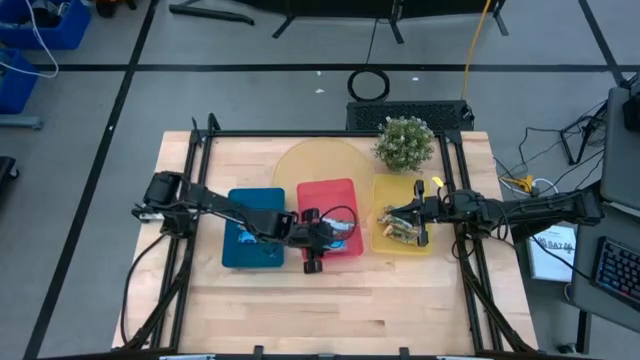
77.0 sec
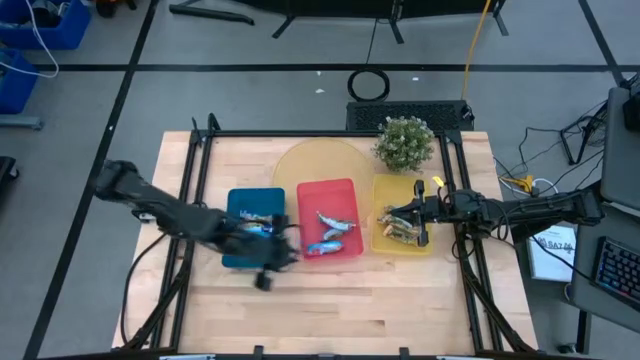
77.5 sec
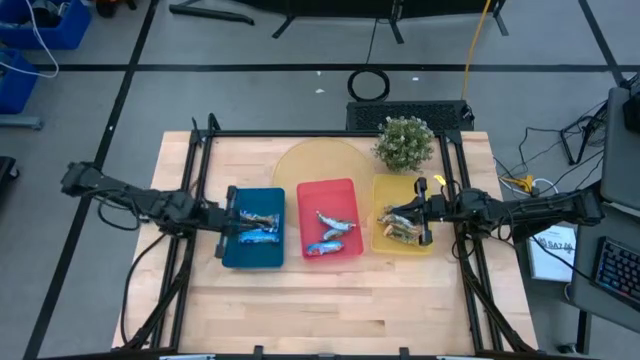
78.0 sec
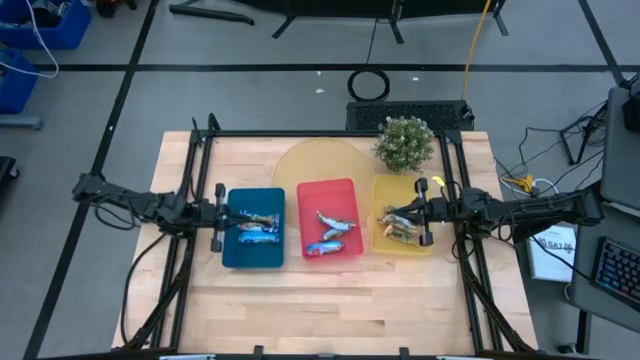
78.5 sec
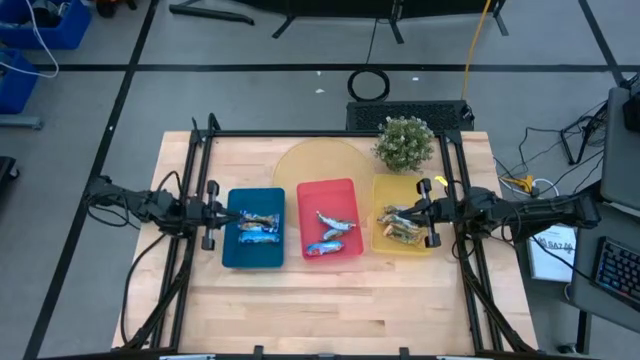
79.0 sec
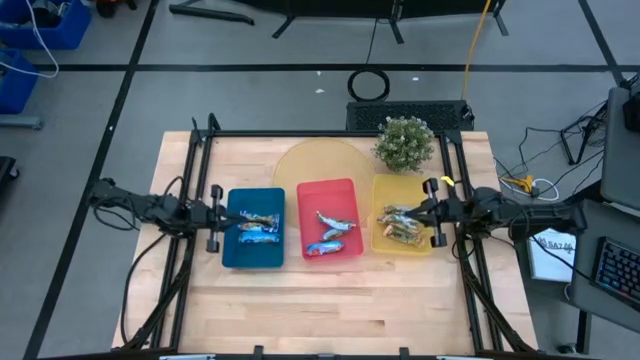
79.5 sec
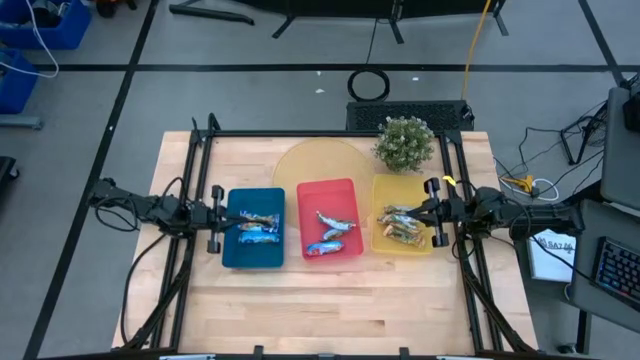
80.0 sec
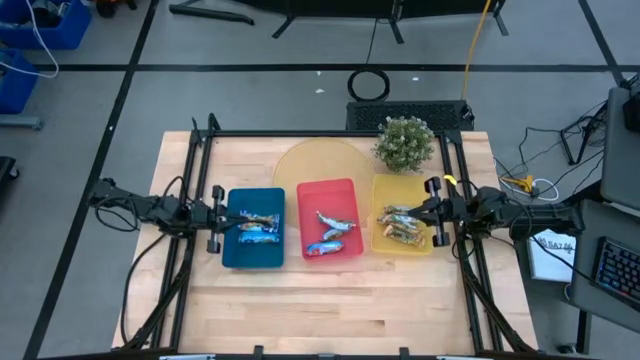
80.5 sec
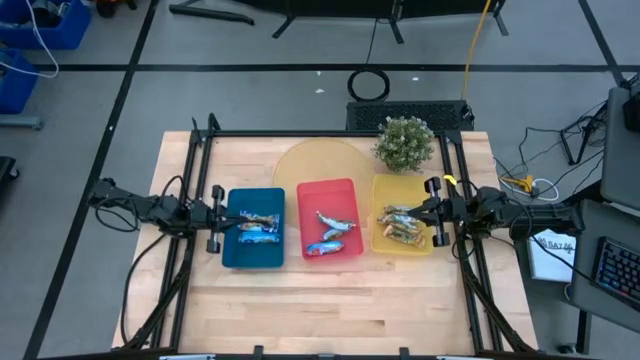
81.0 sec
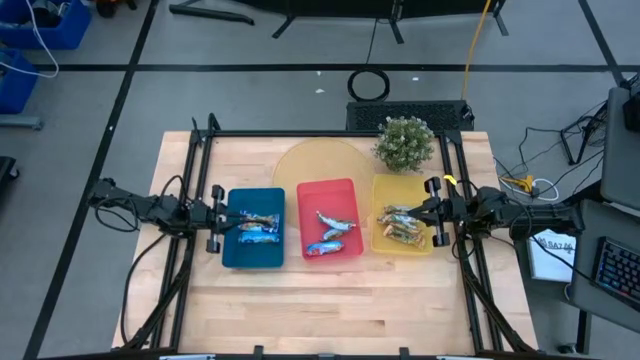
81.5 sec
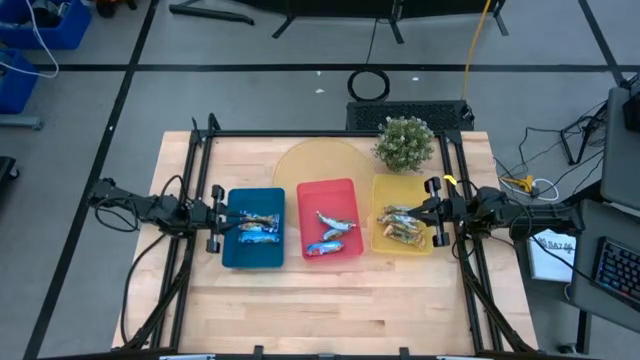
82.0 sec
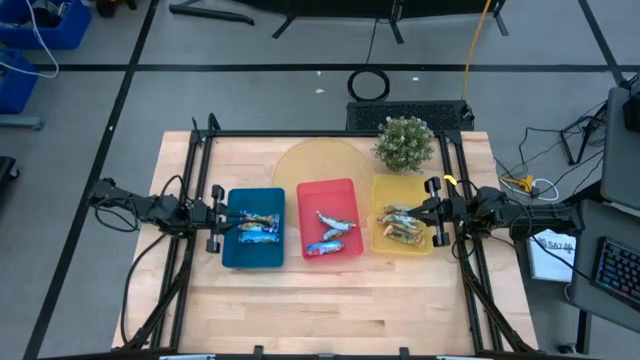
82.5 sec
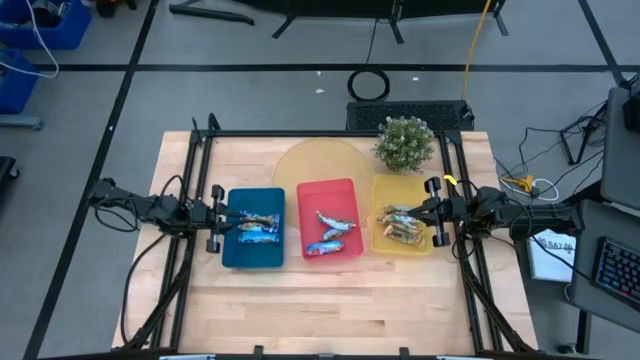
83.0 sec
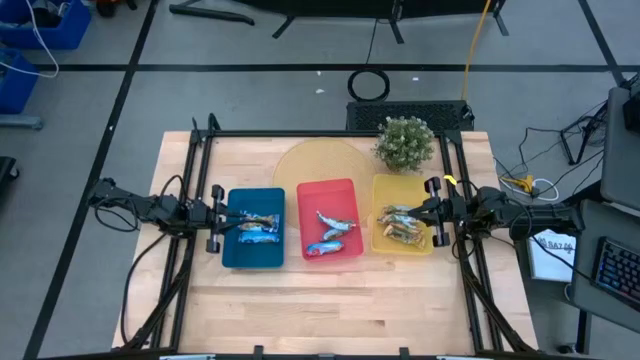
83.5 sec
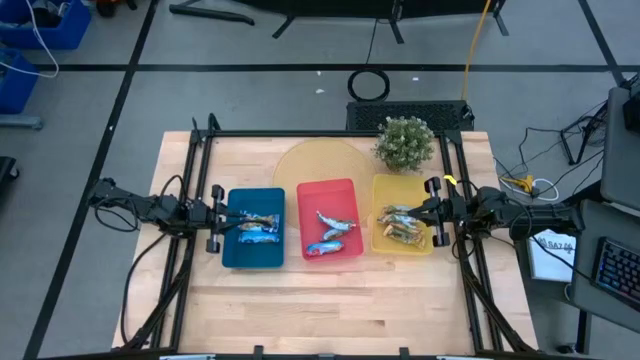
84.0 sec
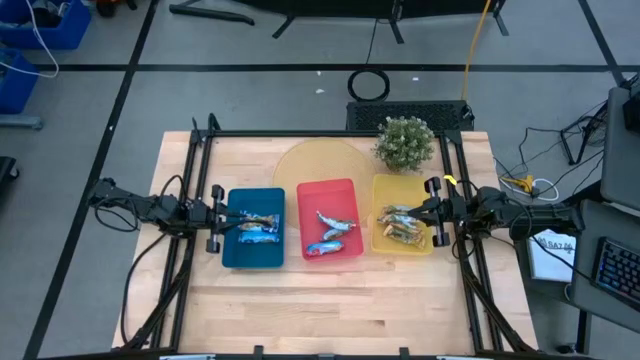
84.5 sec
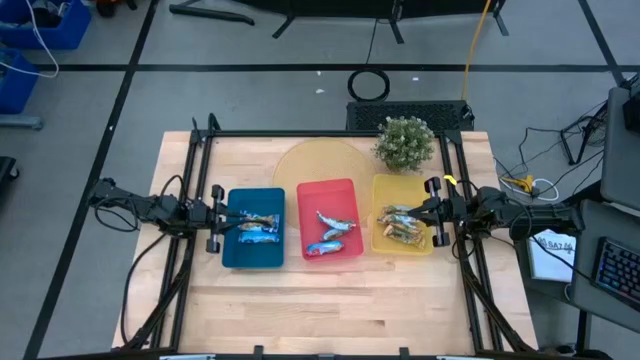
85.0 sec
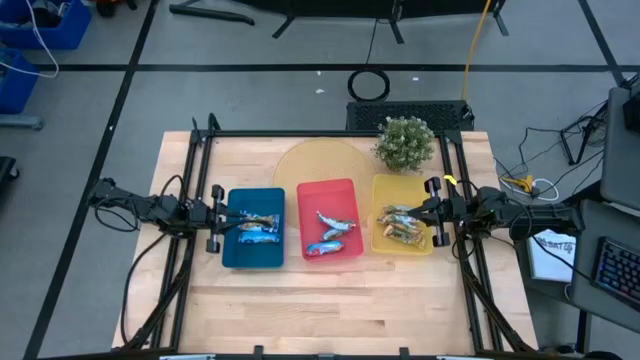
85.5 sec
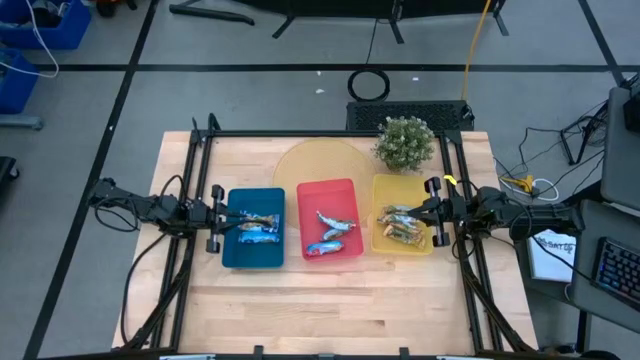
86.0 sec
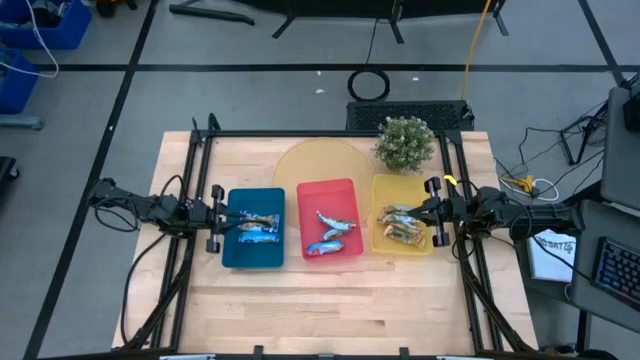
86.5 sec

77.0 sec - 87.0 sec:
Task: Pick and place Granola Bars by type
Return to Home Position

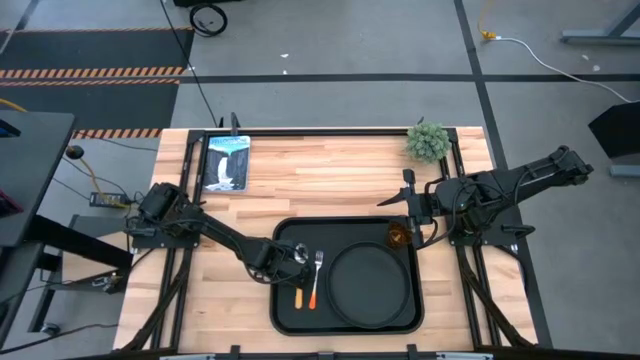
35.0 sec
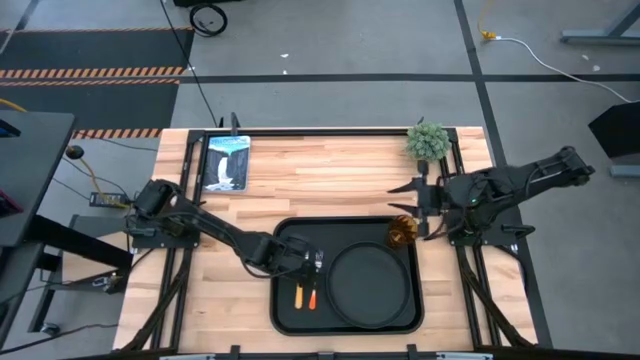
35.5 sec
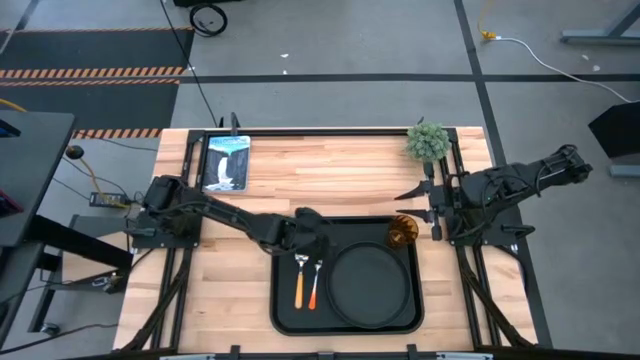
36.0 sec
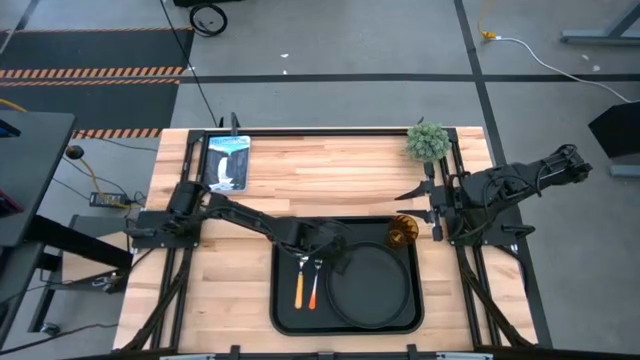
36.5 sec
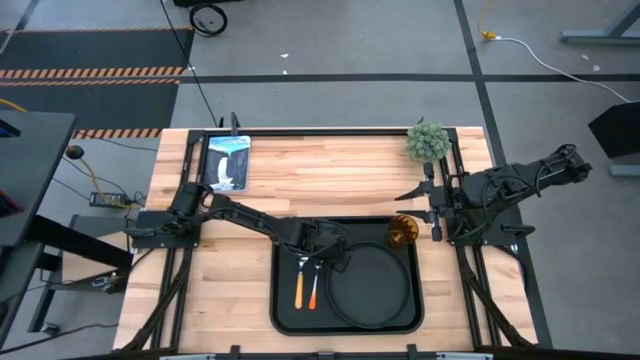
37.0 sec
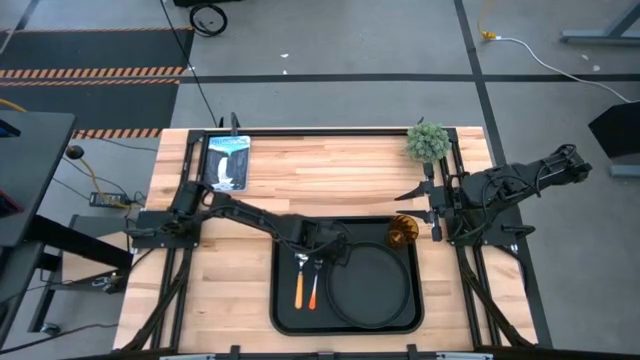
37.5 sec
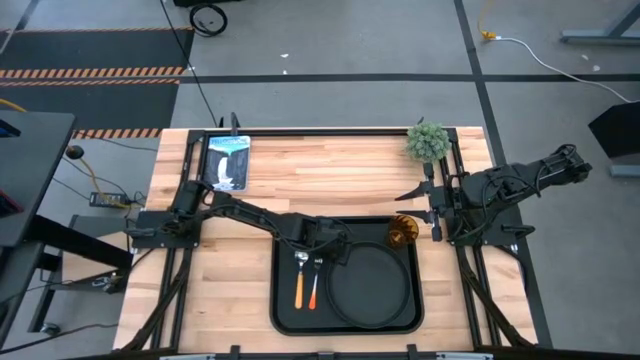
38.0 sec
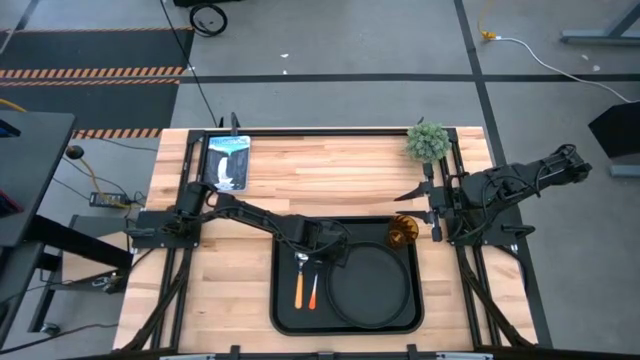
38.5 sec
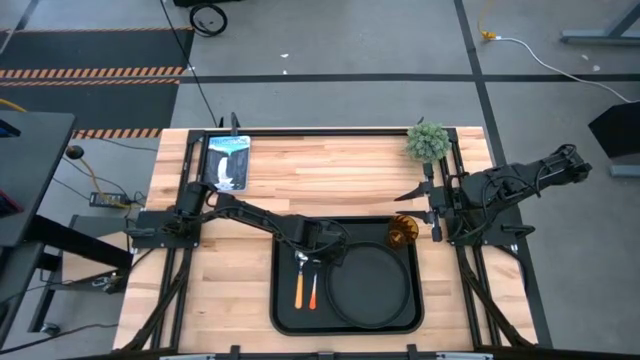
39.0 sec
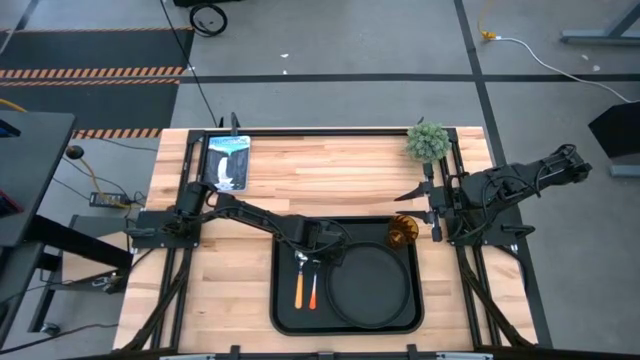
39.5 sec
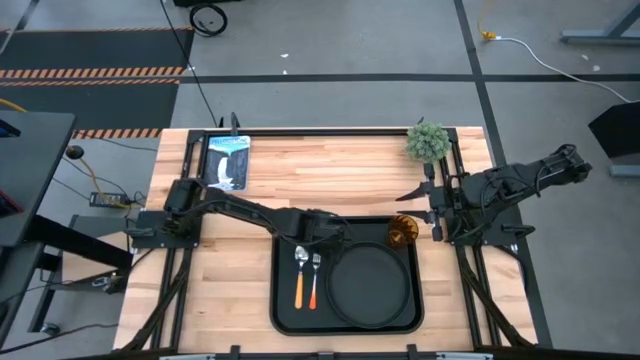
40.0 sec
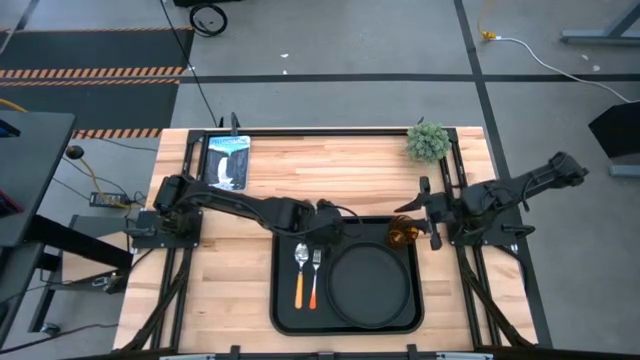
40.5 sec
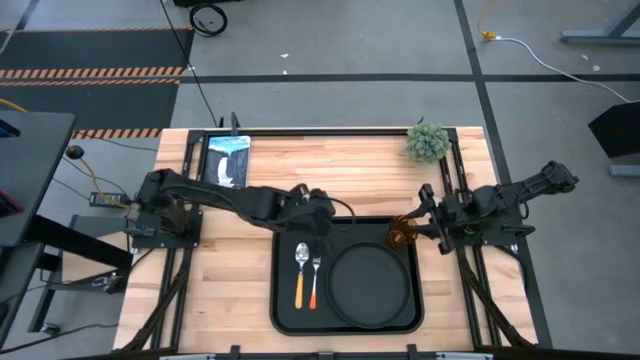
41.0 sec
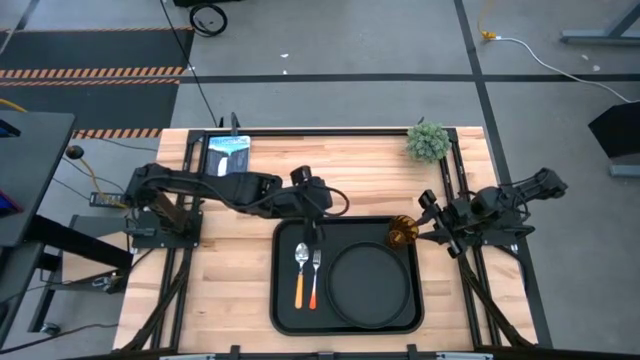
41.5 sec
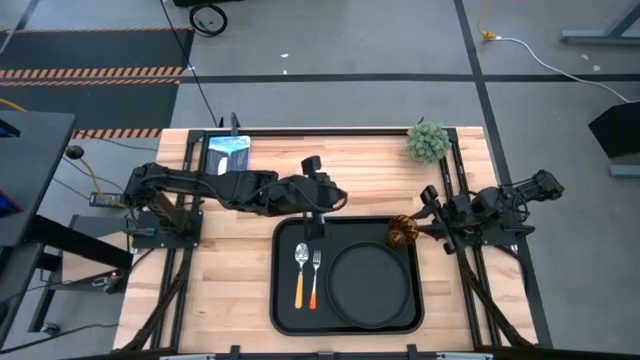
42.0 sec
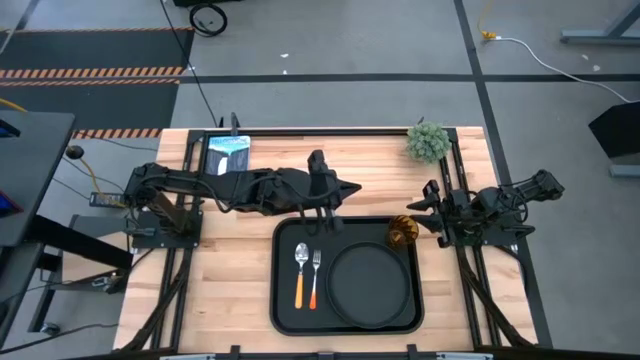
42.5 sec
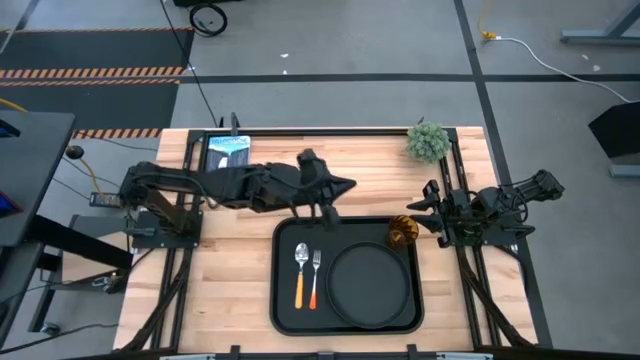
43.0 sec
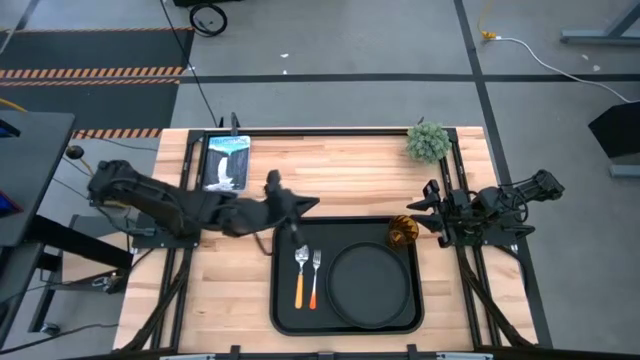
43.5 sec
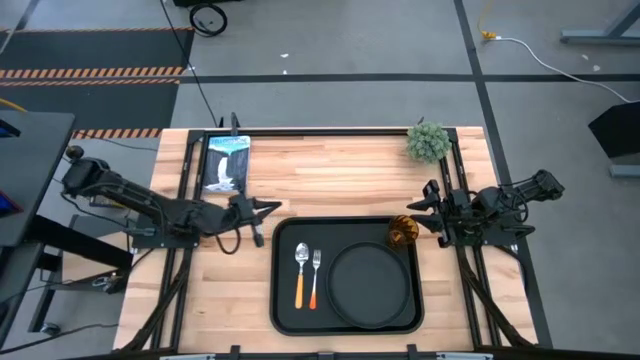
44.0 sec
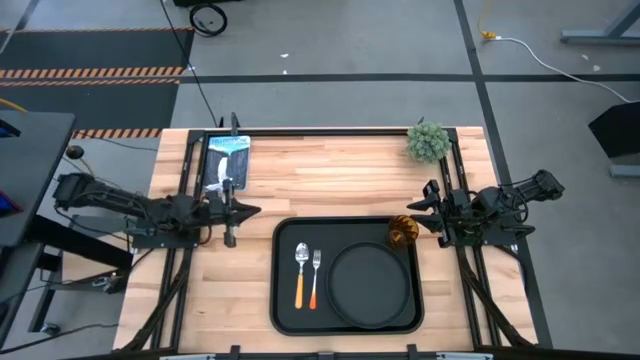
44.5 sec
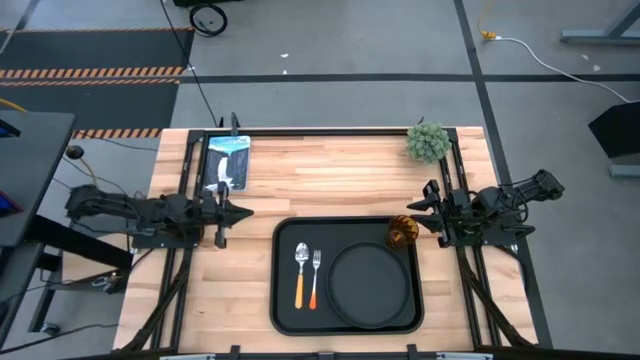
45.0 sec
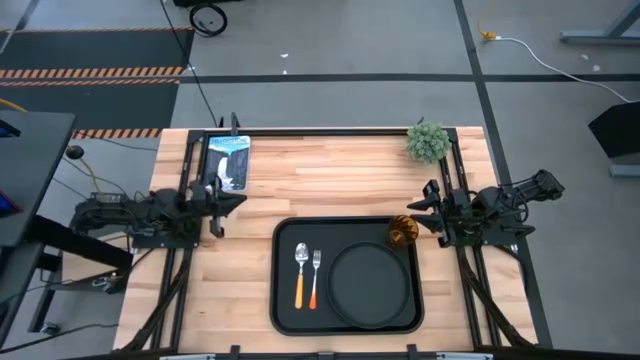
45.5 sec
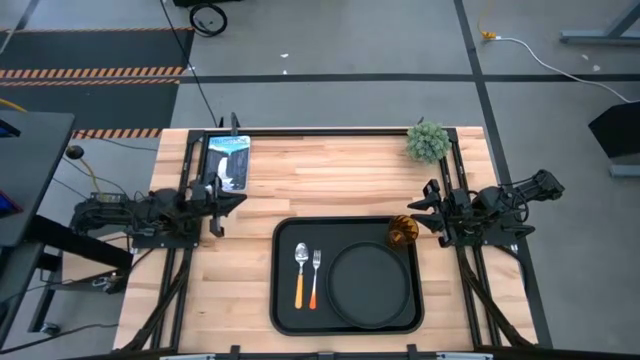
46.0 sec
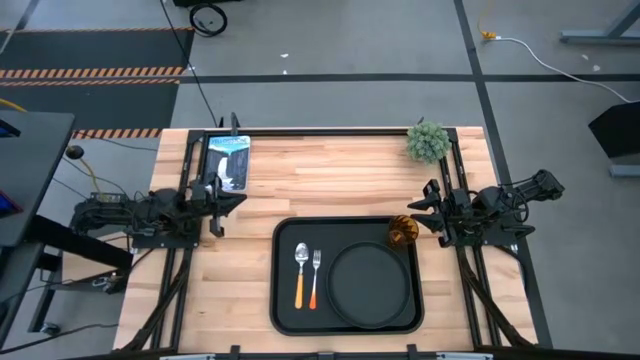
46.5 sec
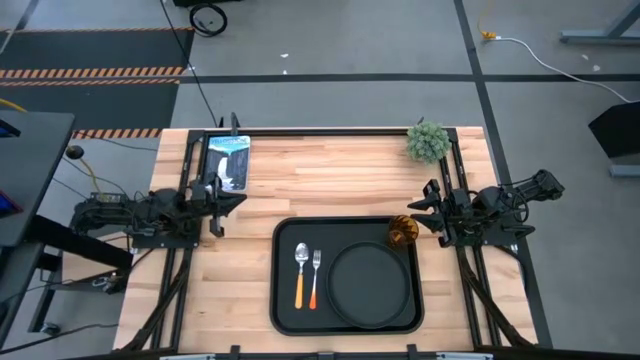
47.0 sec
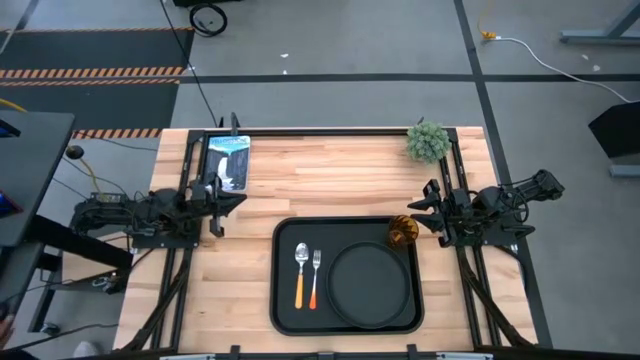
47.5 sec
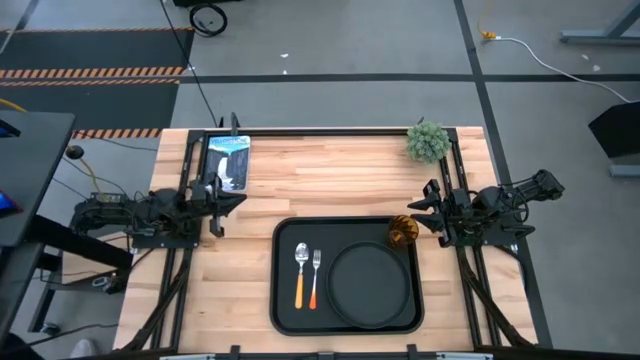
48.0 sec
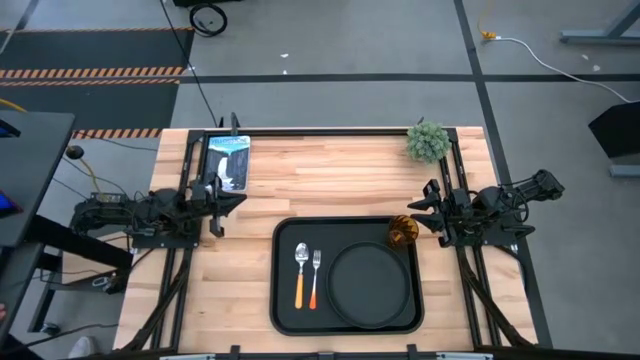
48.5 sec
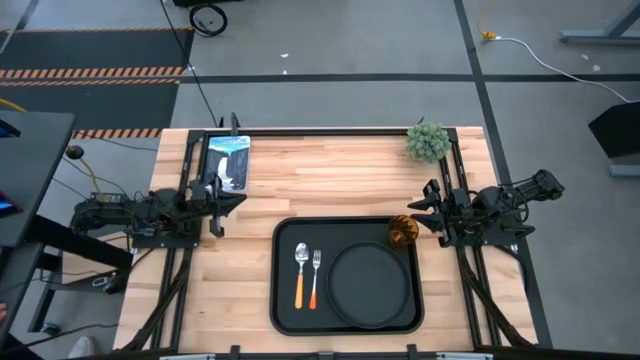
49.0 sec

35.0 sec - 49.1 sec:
Task: Pick and place plate/cup/fork/spoon on tray
Return to Home Position
